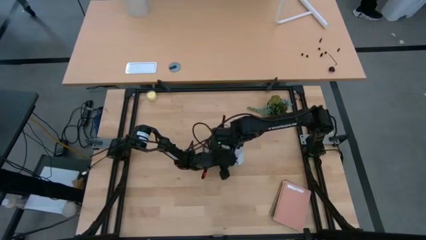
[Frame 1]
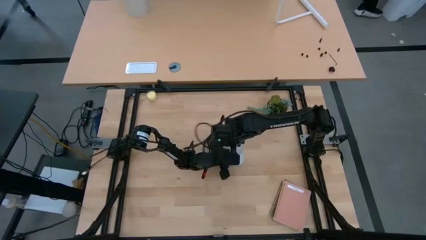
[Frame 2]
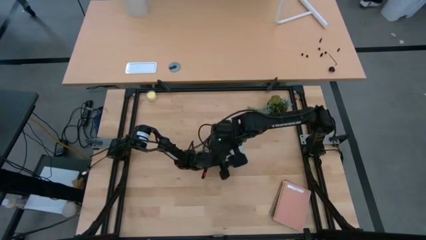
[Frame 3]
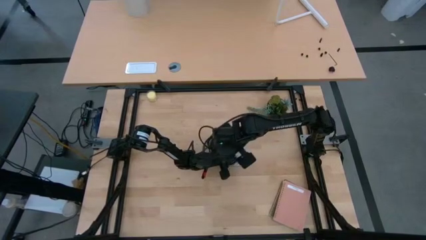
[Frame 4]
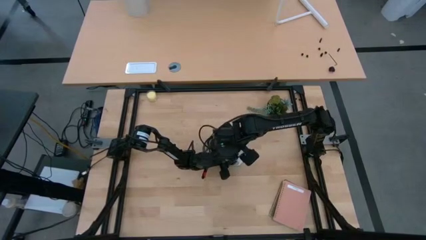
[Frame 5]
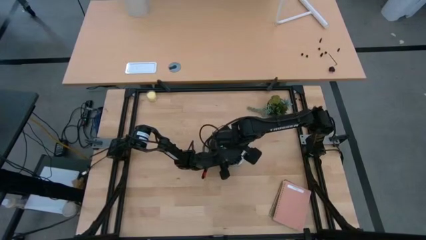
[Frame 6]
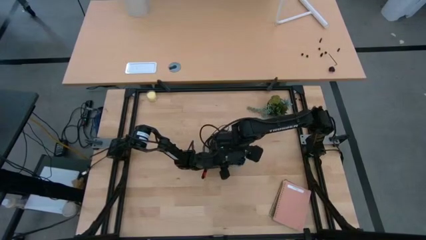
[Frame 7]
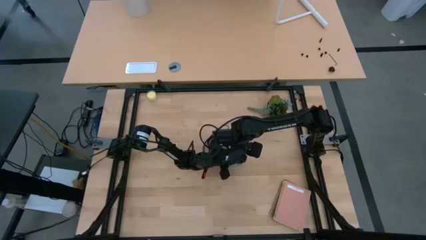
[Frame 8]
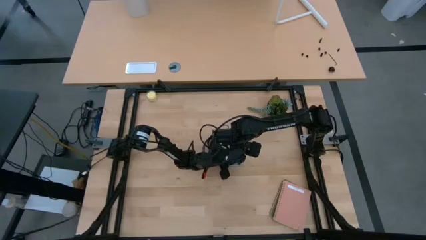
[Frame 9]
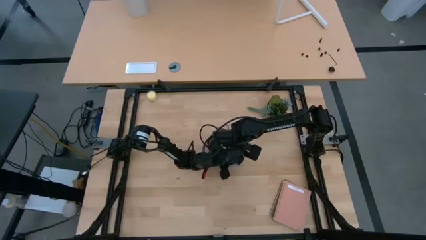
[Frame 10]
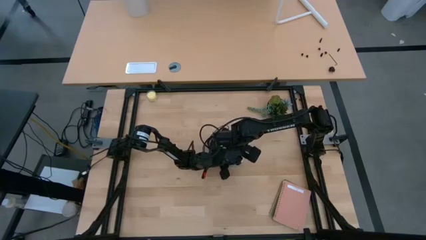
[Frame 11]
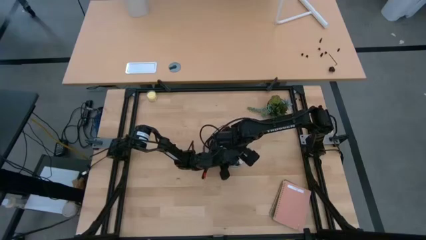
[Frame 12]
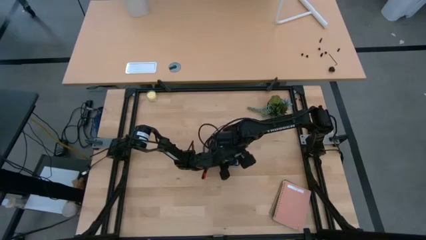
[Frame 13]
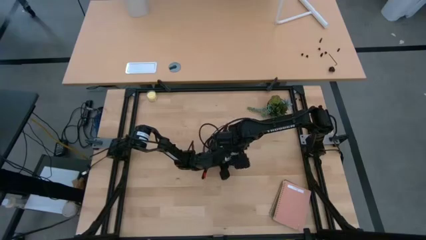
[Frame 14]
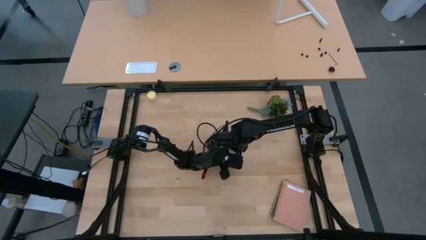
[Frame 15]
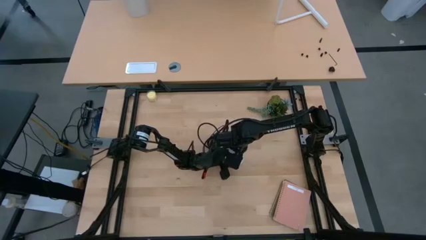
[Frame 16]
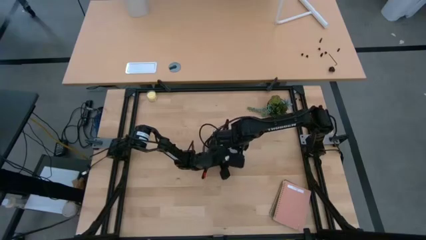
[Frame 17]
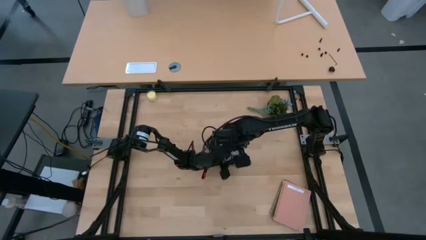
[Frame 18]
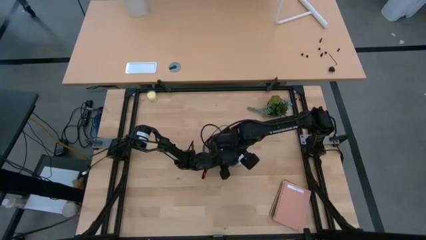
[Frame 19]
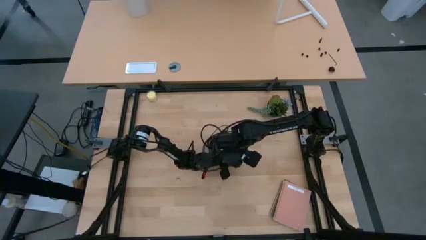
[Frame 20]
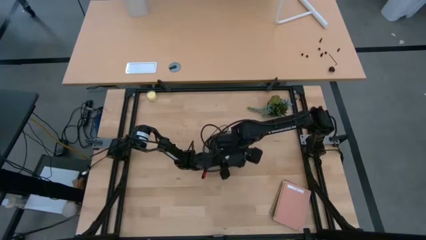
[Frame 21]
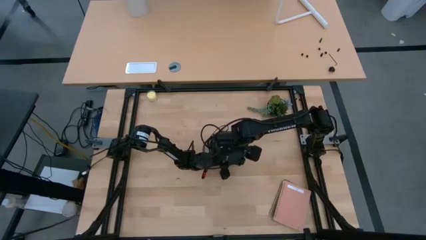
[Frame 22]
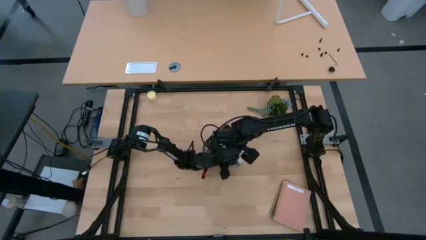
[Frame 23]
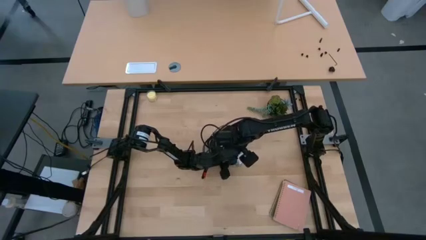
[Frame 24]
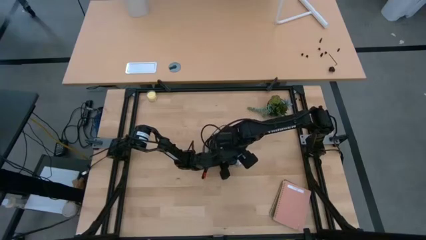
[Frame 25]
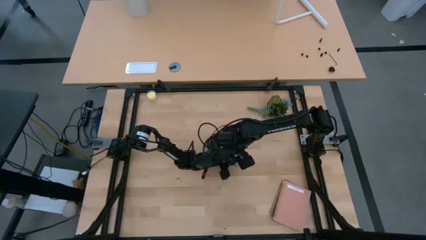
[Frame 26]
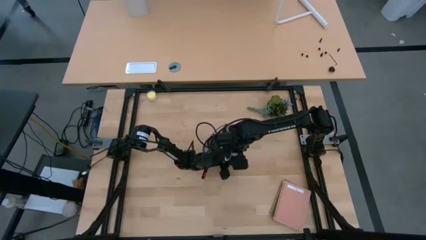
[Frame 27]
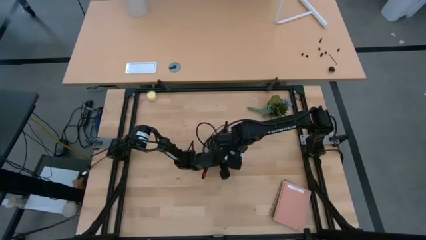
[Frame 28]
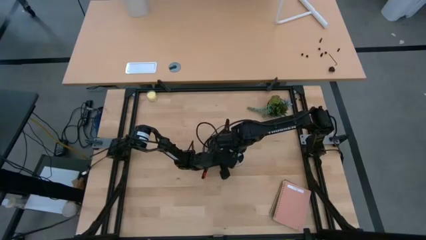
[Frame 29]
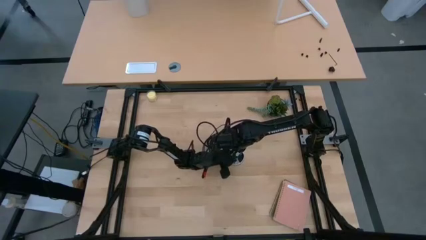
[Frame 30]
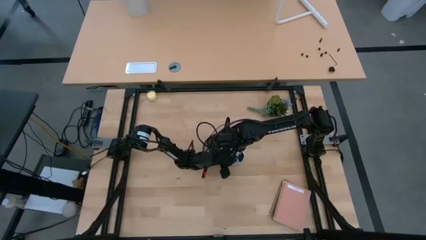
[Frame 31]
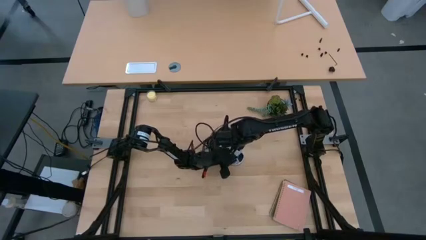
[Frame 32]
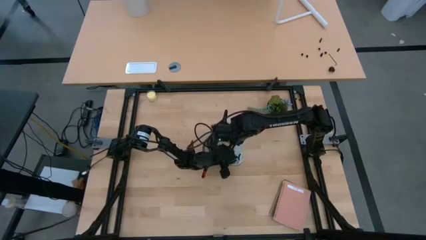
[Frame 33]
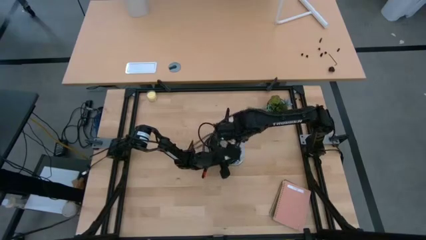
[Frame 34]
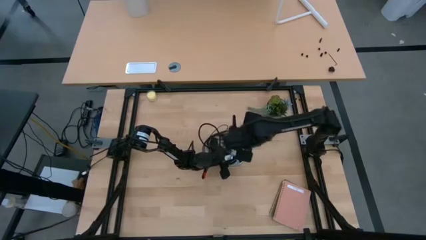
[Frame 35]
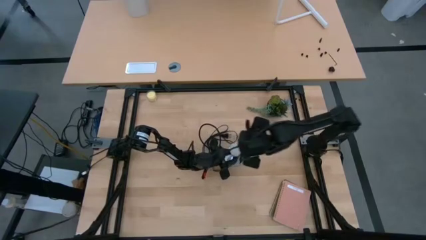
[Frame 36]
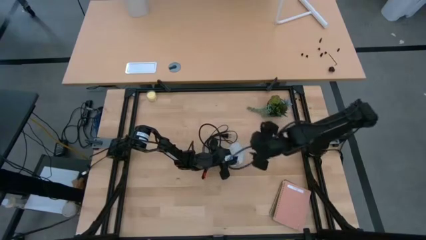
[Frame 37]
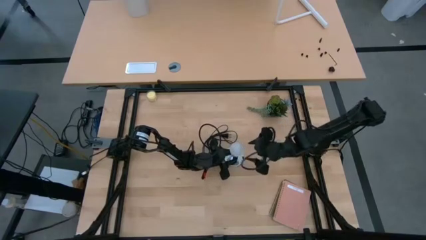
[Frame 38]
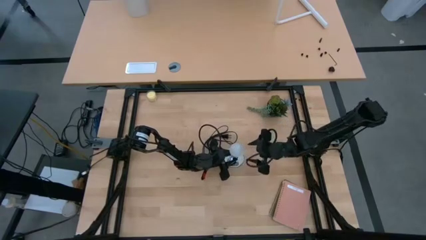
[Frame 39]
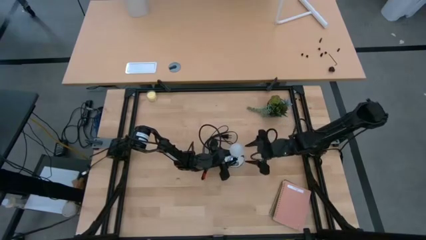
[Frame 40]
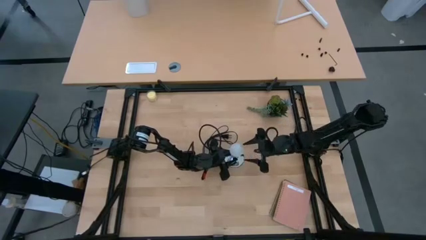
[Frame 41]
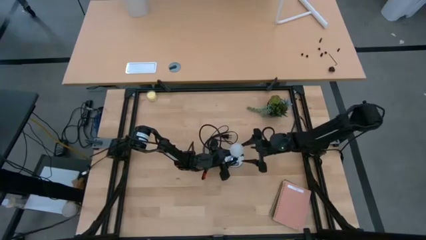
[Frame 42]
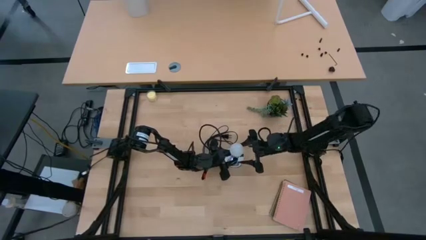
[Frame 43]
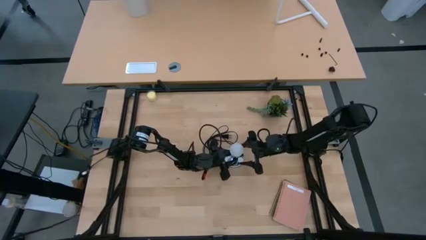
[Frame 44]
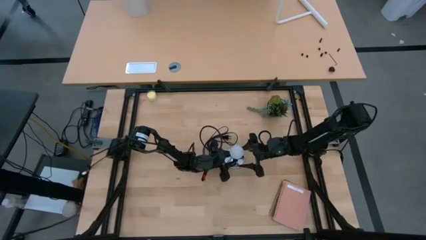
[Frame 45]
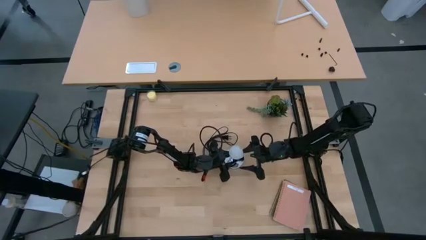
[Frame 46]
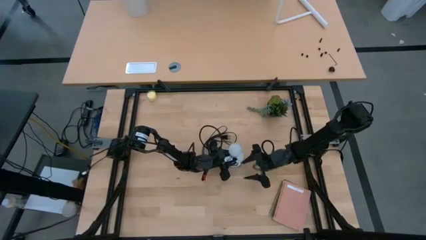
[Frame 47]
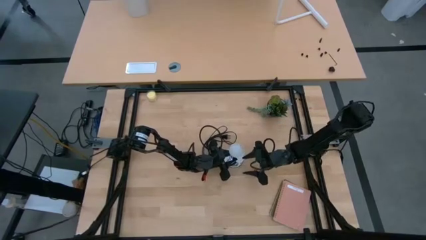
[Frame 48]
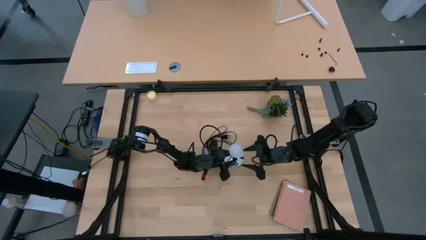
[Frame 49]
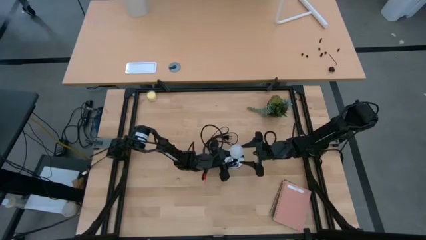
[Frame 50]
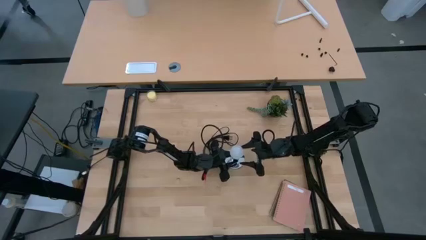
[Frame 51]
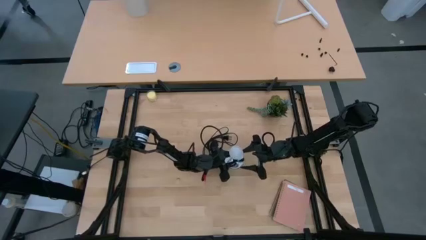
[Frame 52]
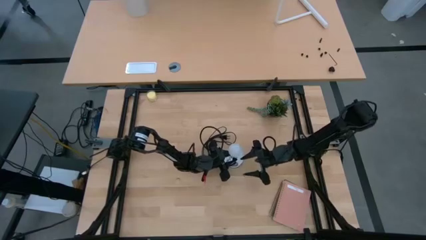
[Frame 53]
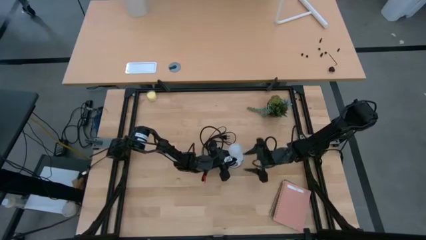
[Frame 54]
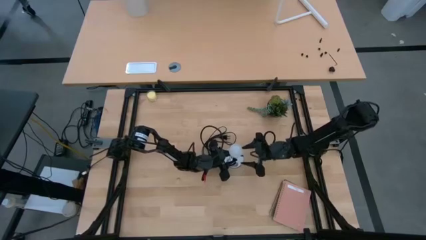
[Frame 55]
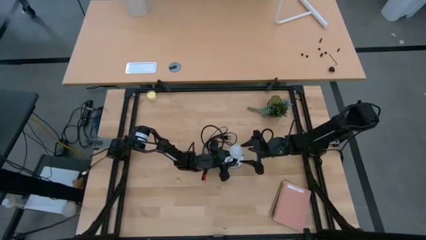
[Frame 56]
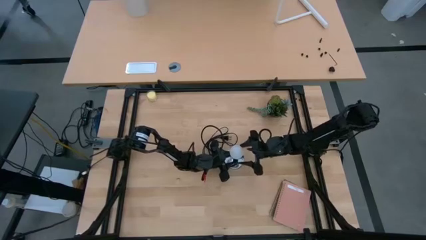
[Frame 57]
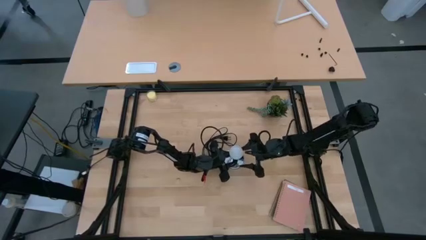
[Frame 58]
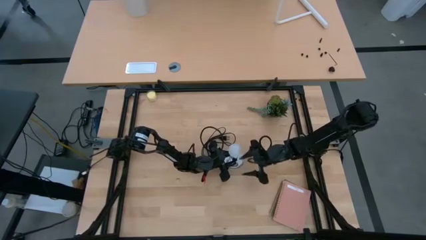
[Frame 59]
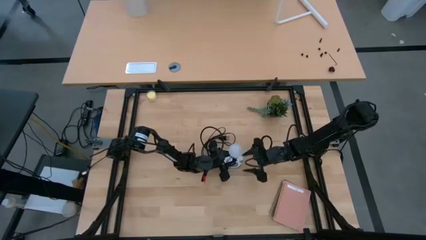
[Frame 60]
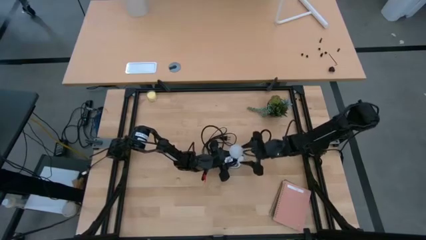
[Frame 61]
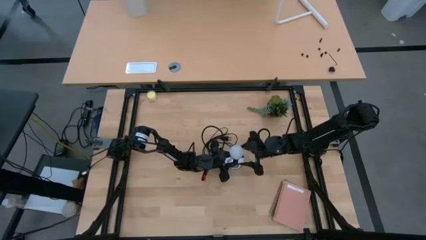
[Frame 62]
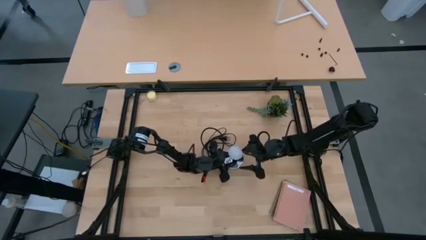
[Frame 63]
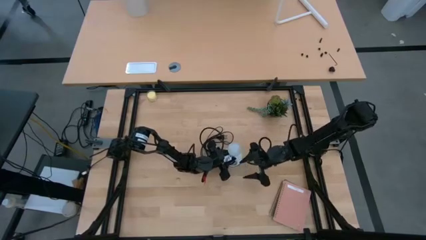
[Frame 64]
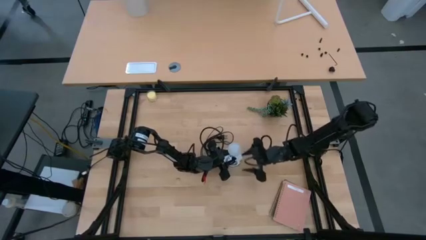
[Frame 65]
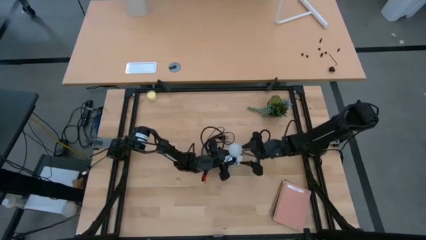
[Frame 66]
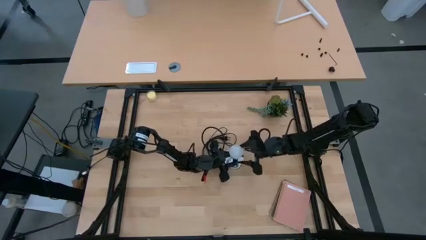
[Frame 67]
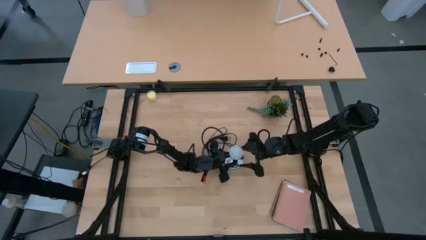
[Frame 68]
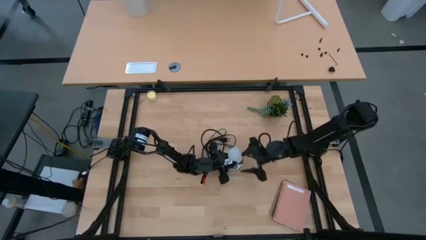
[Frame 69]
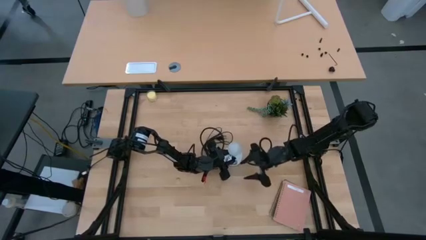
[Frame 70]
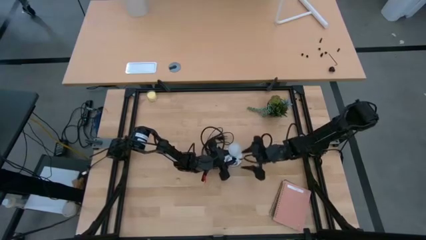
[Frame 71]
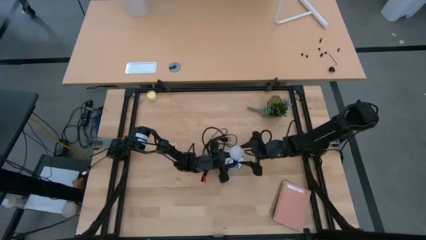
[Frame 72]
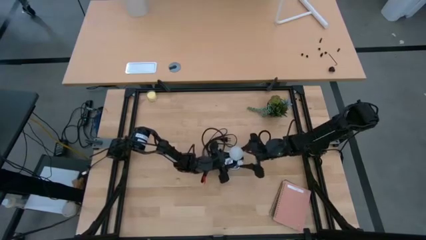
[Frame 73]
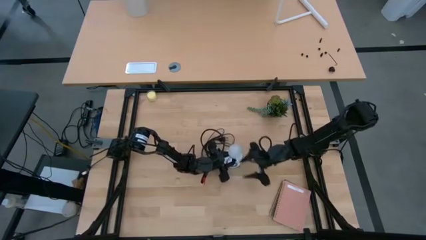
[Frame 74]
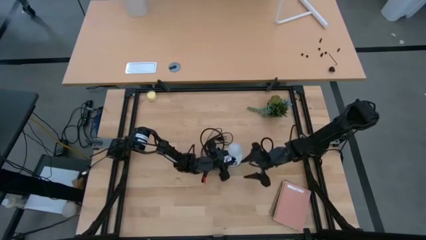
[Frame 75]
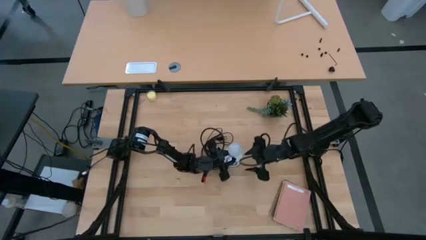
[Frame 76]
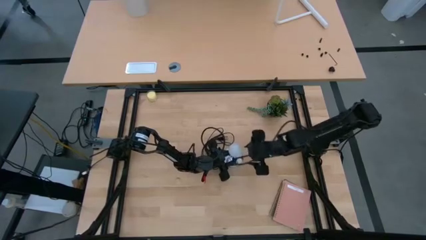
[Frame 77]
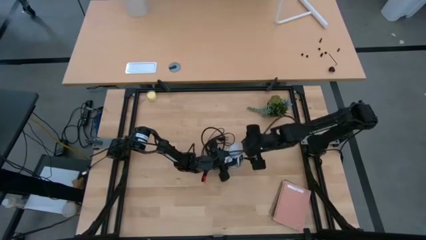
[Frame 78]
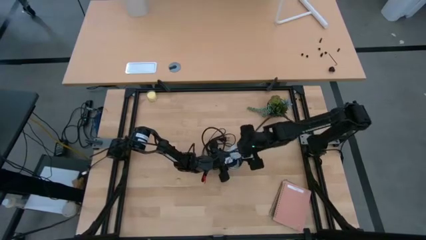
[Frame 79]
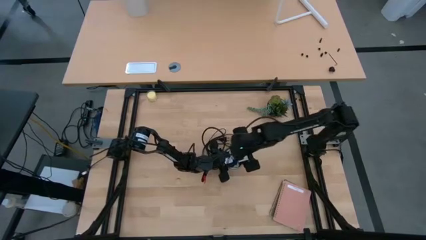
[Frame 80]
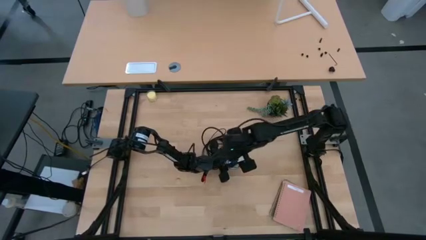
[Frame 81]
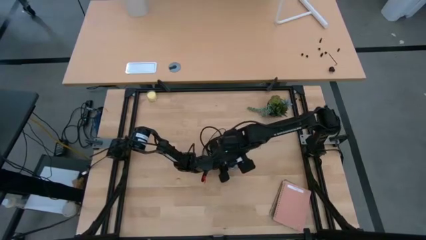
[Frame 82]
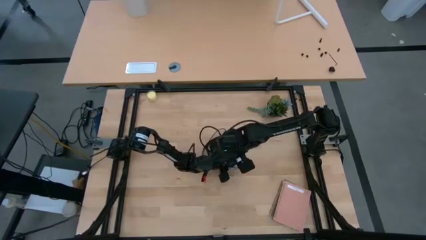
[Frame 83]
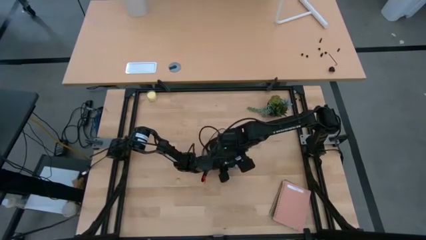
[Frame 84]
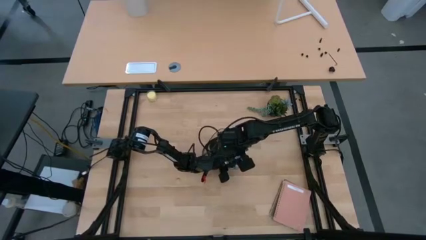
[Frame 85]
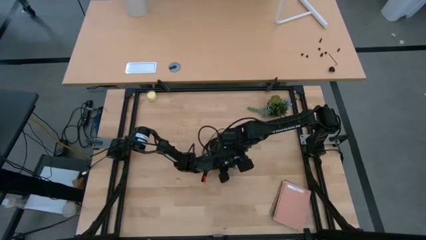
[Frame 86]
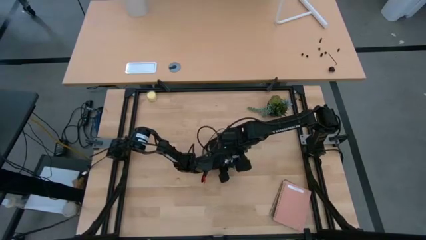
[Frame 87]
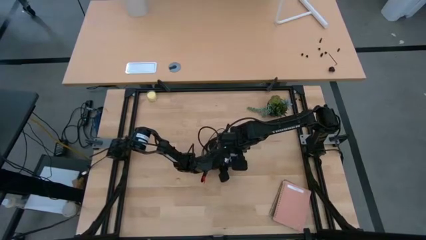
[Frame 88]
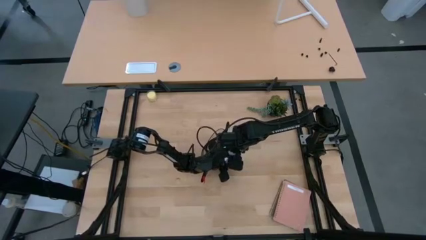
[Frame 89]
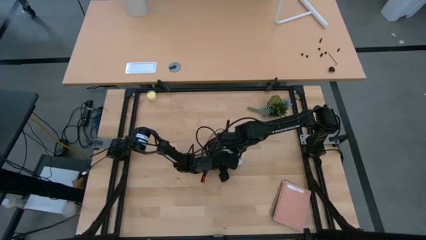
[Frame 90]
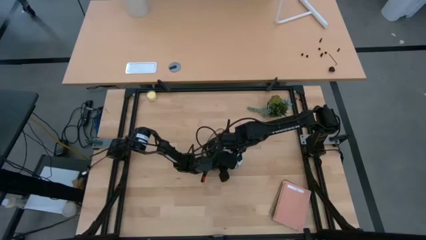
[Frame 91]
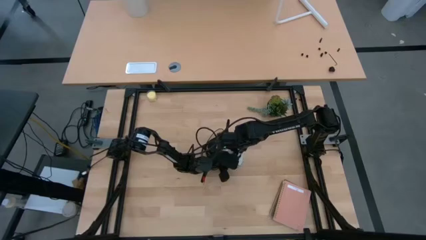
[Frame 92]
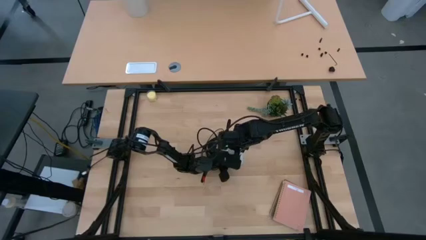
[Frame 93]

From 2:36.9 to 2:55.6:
Task: Screw lightbulb
Insert the white lightbulb into the metallic lamp
